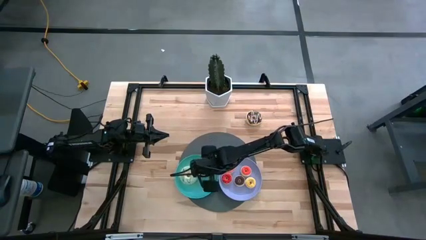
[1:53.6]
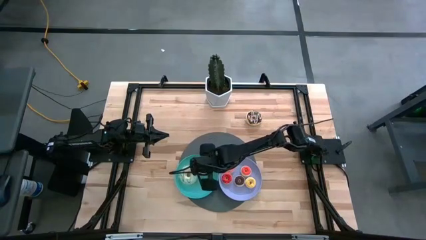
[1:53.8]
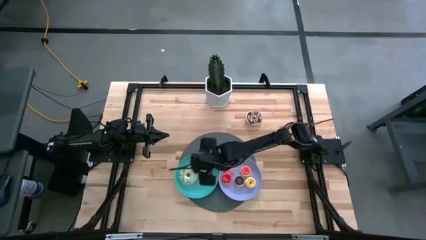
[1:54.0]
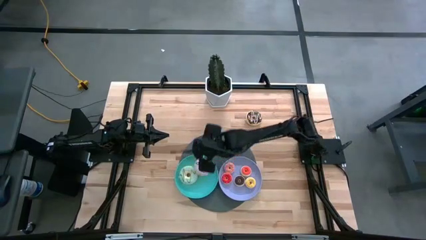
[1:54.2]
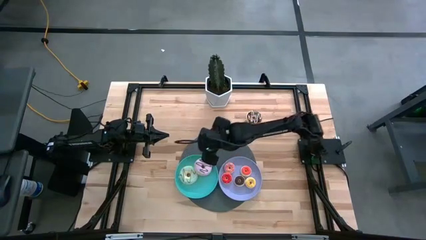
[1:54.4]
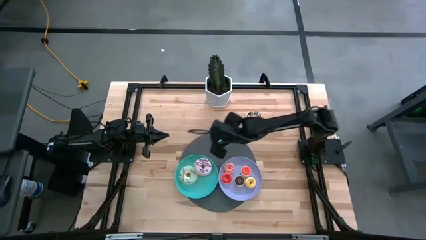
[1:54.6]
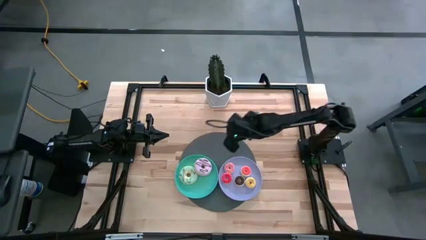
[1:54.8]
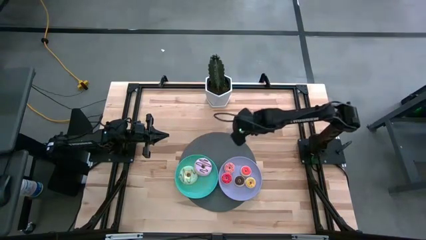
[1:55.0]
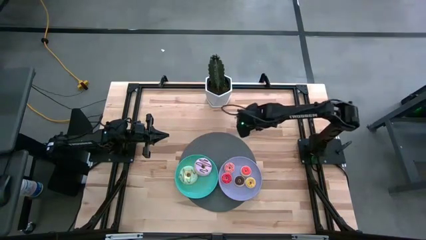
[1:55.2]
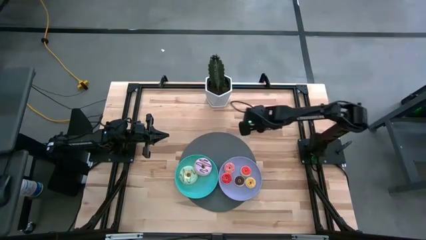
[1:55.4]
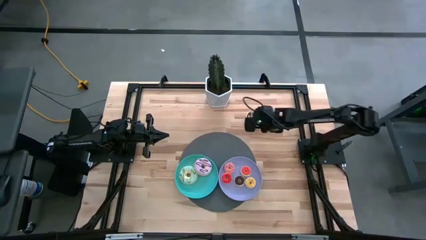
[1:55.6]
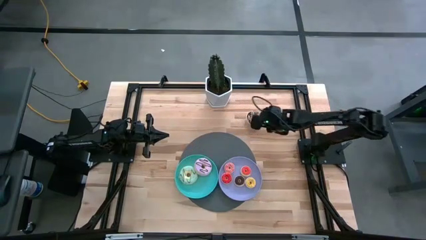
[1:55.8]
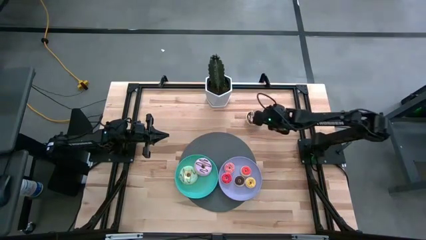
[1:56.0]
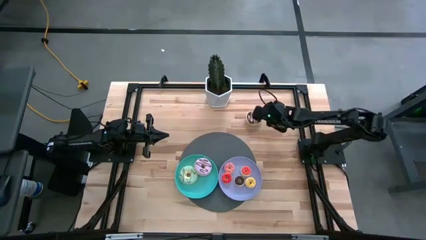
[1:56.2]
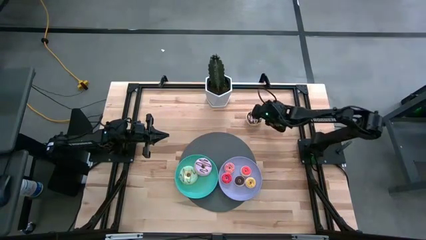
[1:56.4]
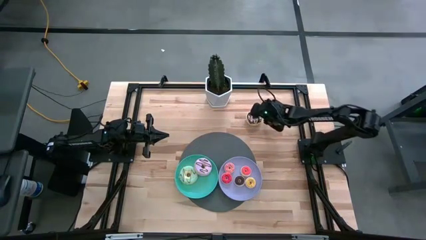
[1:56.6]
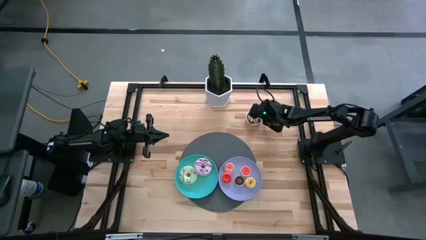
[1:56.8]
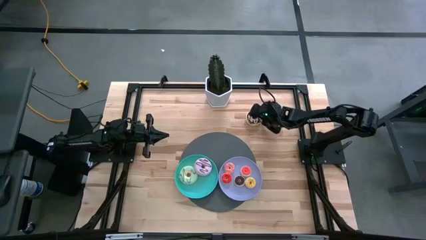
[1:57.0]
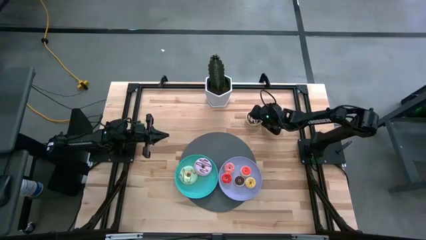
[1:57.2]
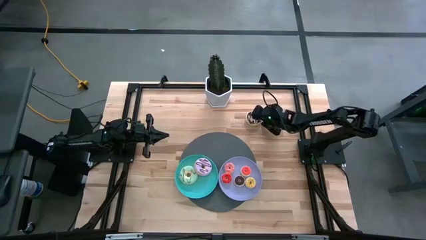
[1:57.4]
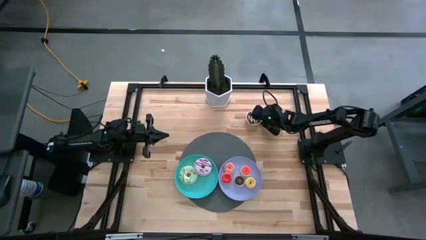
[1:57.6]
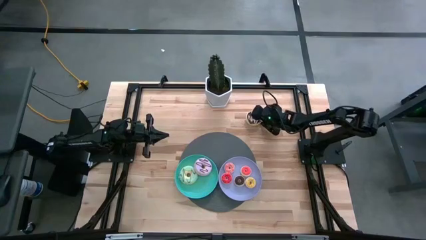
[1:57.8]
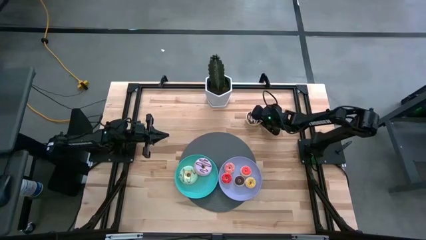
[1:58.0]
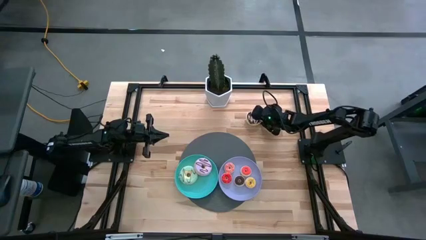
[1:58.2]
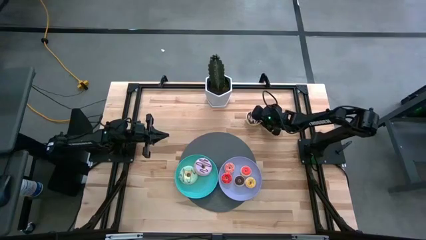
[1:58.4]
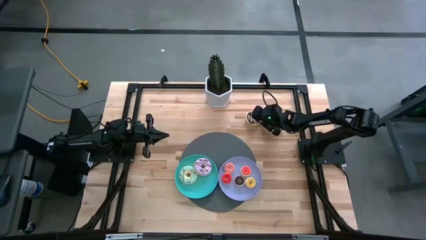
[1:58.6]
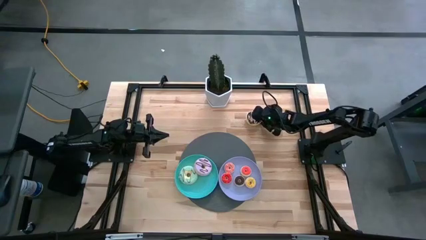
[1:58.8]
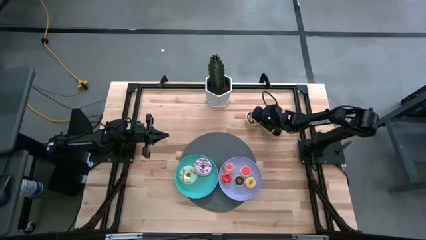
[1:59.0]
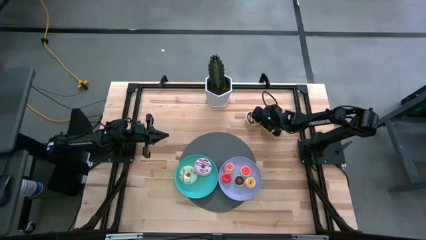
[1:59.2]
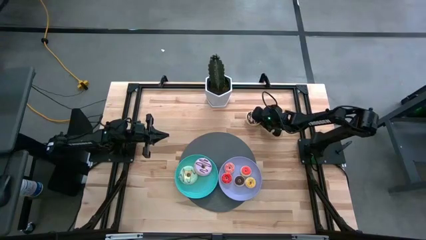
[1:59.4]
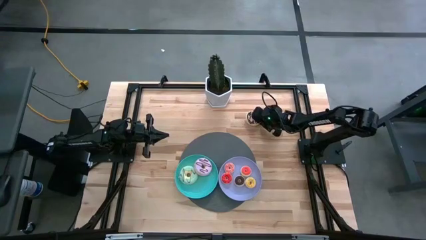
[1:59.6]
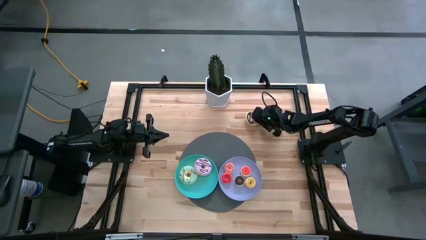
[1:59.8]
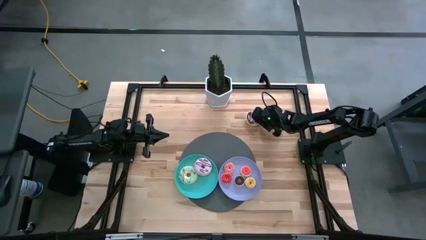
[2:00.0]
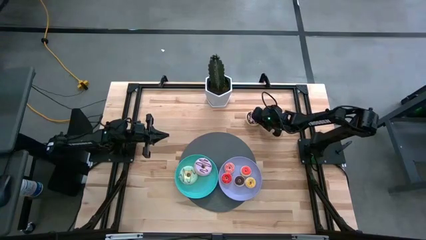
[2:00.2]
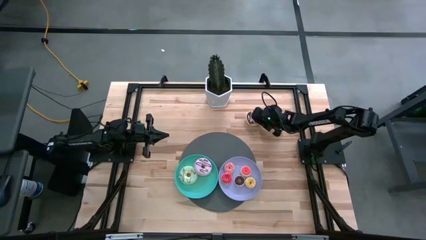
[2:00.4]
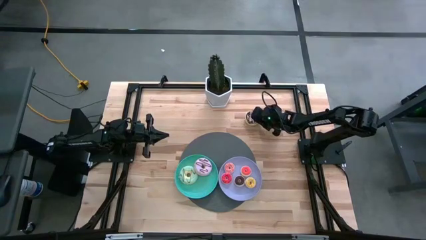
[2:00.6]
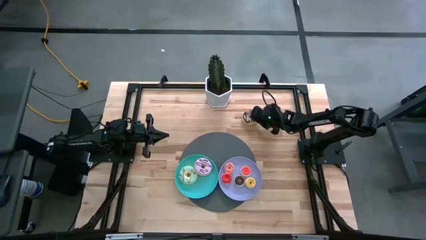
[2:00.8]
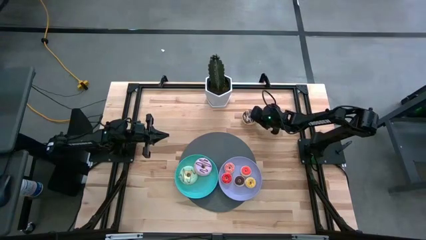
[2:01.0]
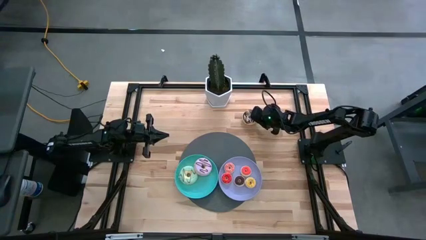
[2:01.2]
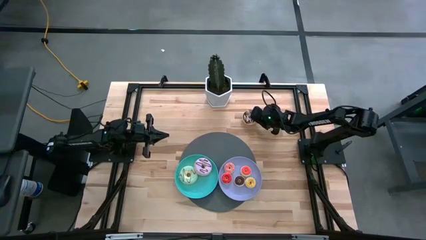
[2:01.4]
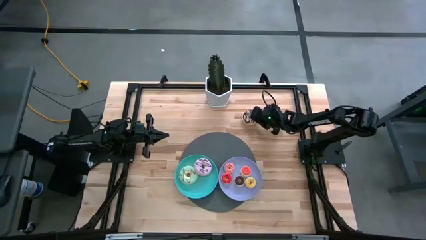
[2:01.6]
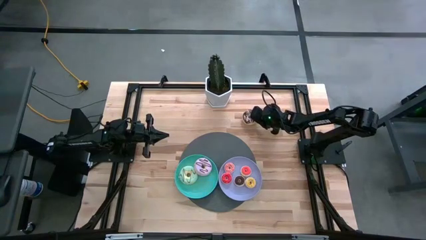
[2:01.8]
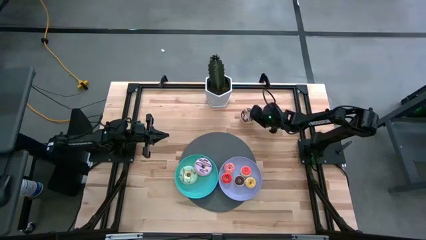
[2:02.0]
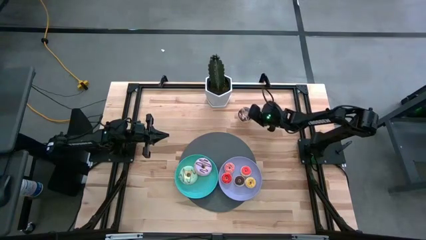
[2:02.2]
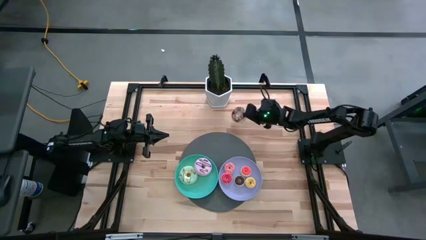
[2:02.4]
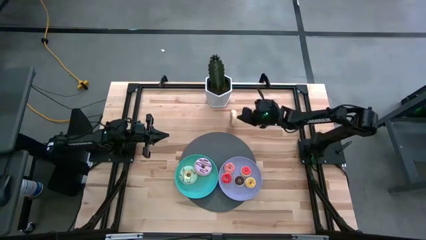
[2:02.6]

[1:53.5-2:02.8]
Task: Pick & Place donuts
Put the big black donut on the green plate

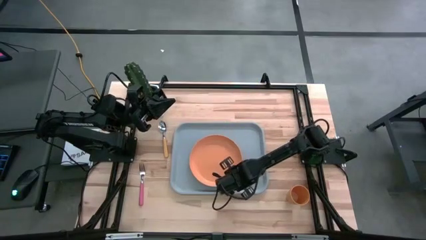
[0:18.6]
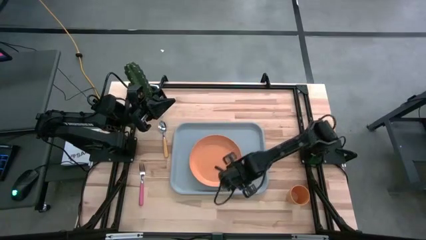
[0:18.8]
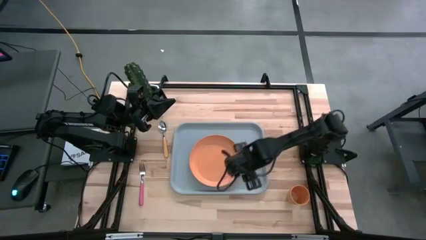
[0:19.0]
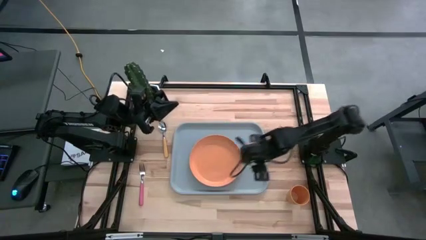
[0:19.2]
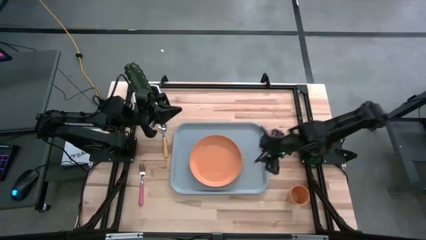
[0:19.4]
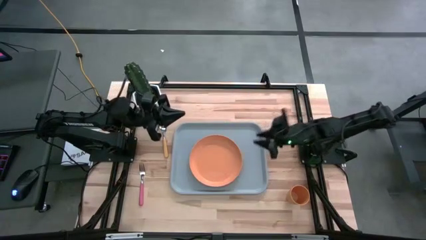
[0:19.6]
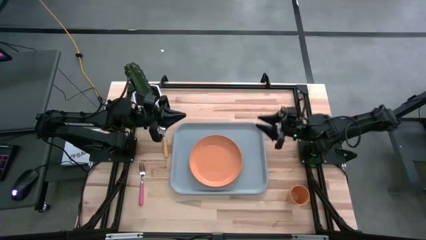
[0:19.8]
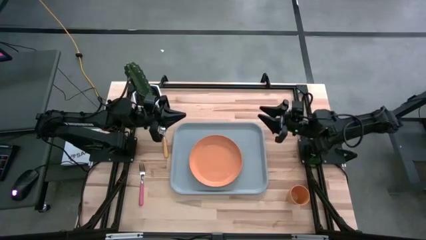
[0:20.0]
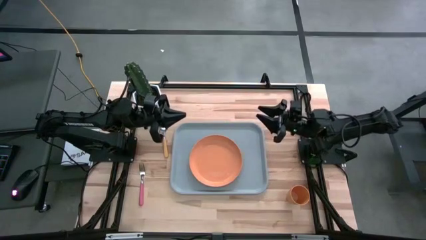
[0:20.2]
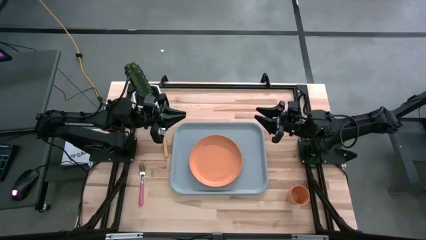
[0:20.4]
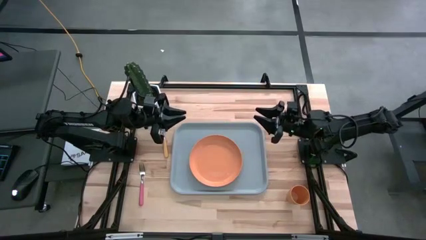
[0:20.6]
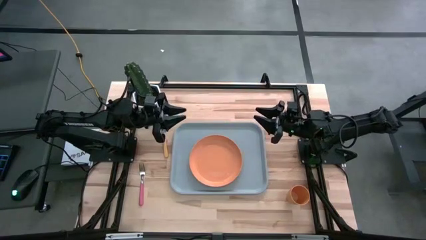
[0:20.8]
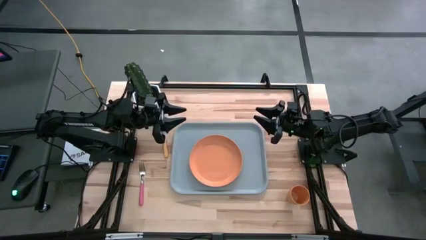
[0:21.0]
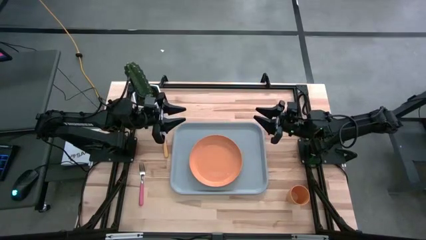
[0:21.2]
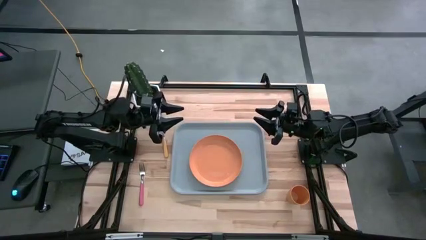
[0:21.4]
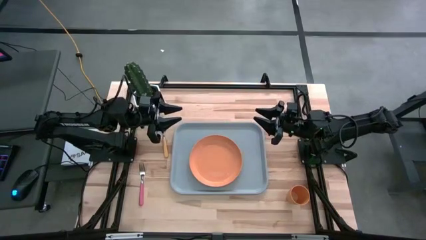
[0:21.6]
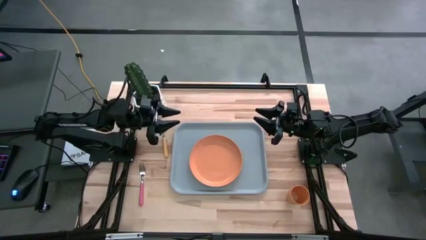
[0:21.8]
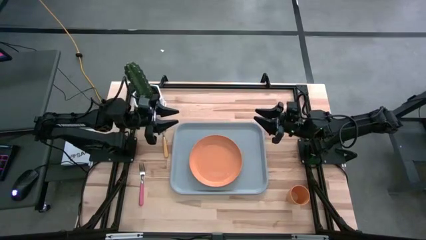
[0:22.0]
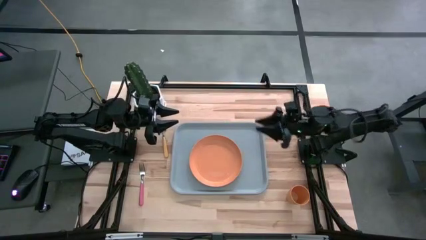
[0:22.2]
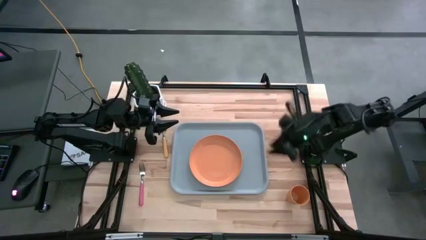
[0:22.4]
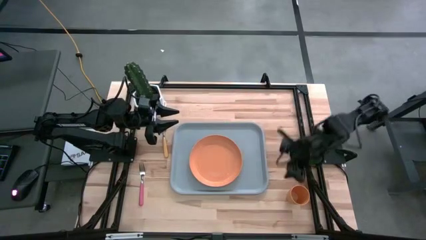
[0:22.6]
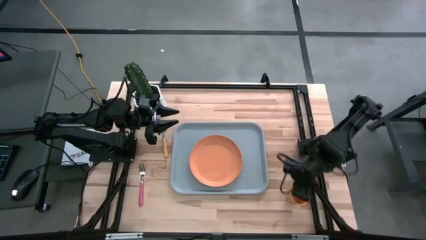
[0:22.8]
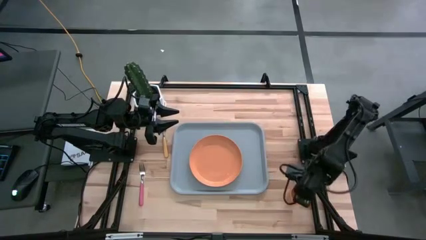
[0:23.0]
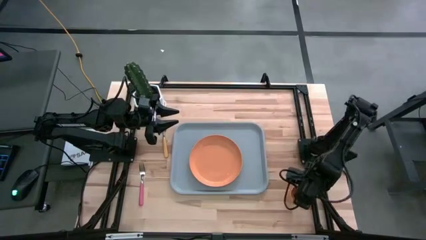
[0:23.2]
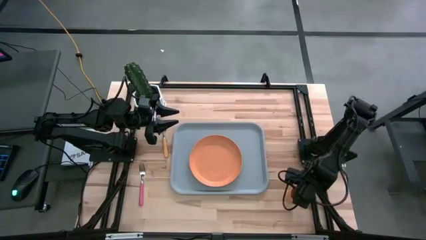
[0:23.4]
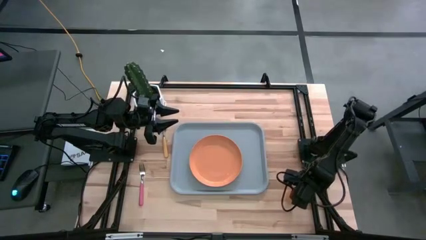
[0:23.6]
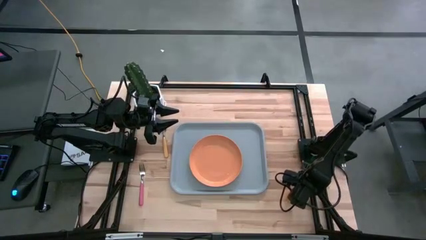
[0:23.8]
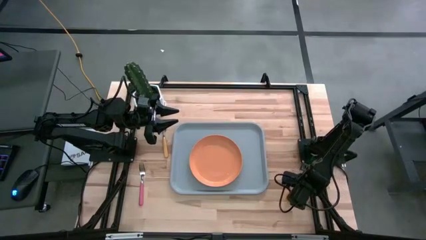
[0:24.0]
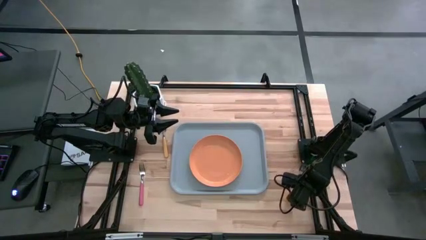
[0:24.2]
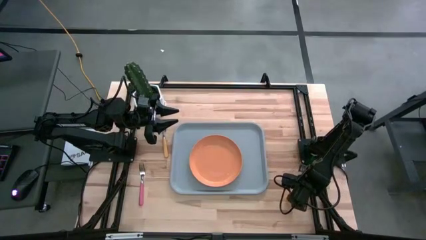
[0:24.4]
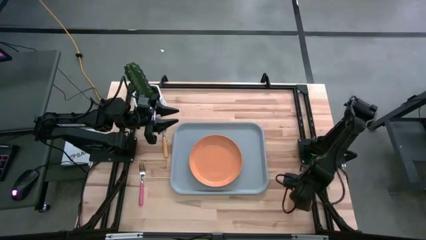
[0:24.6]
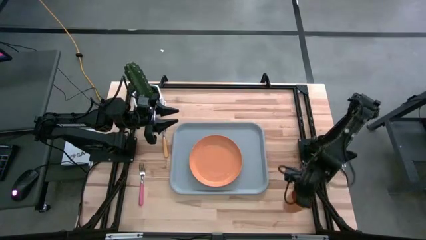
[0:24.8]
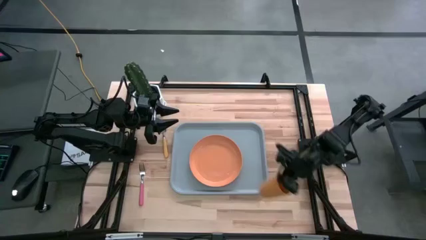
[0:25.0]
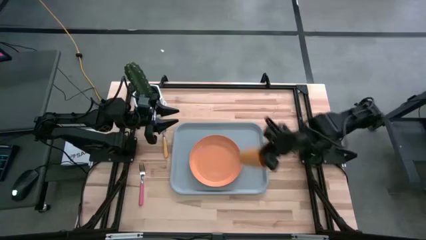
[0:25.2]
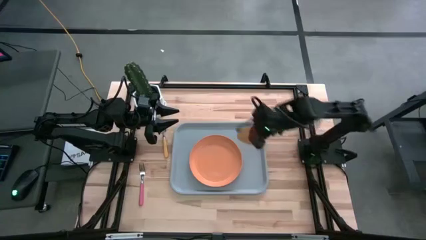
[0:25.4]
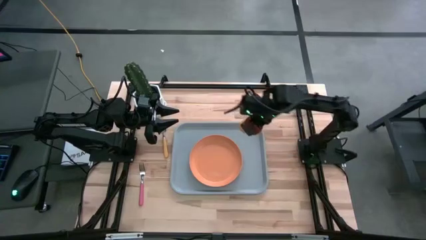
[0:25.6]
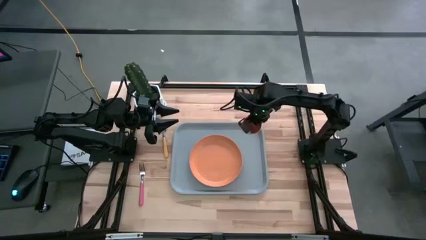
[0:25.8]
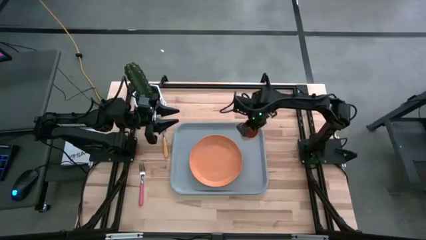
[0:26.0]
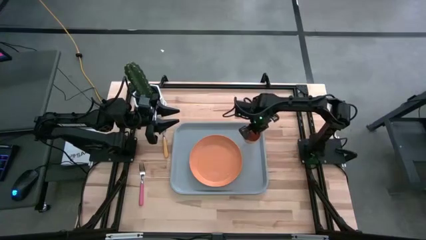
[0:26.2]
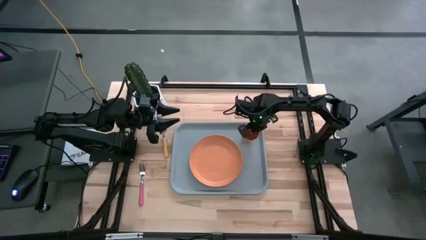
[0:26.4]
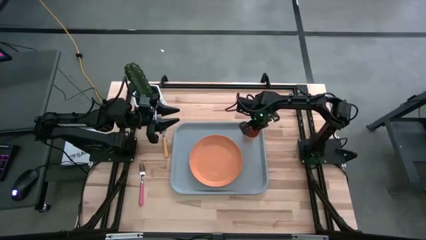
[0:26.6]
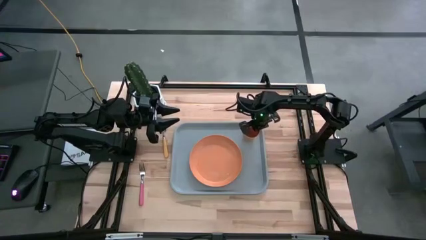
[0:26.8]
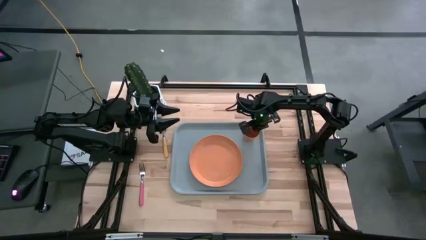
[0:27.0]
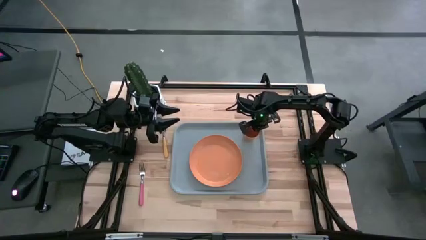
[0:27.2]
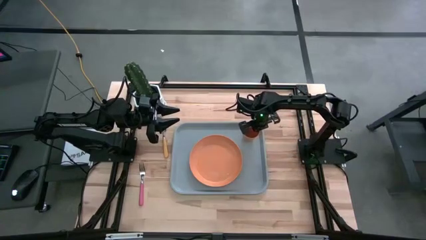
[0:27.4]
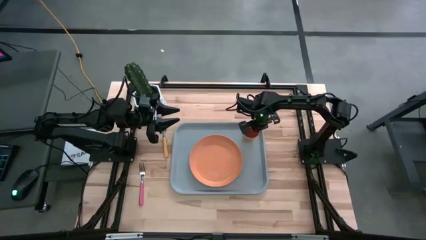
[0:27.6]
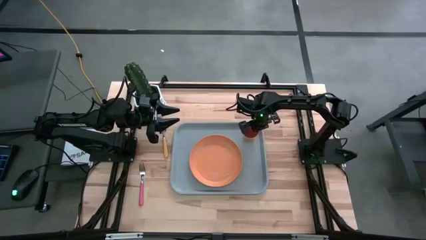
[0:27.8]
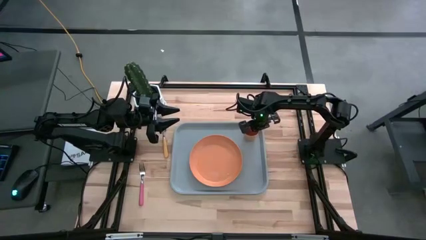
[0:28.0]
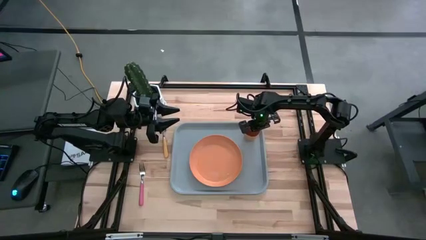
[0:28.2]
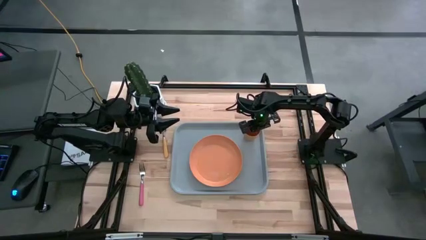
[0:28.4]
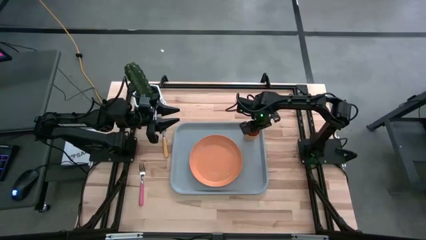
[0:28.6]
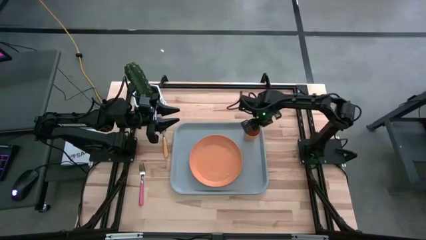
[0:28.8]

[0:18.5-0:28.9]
Task: Pick and place plate/cup/fork/spoon on tray
Put the orange cup to the top right of the orange plate on the gray tray
